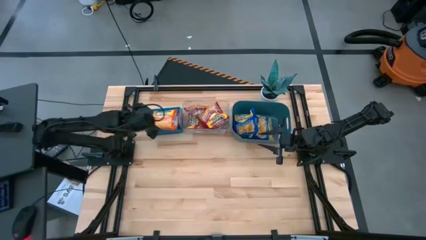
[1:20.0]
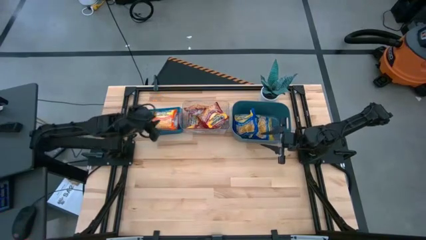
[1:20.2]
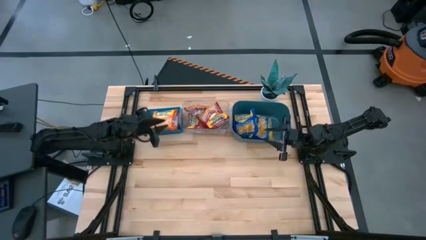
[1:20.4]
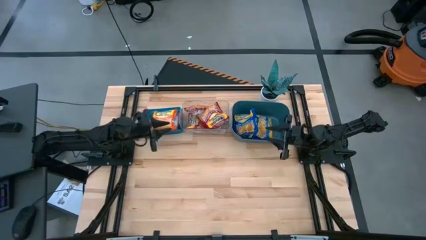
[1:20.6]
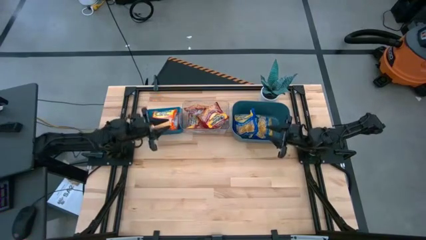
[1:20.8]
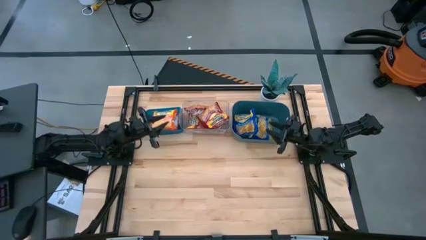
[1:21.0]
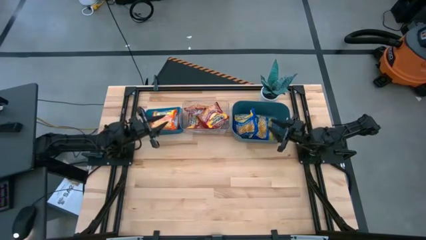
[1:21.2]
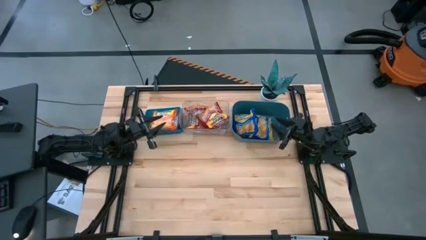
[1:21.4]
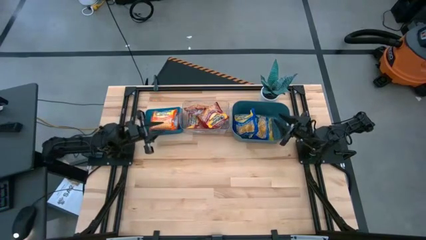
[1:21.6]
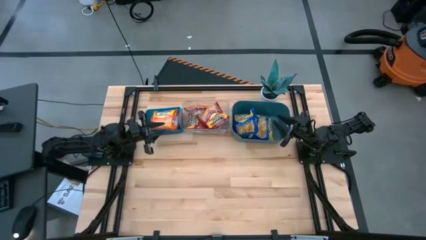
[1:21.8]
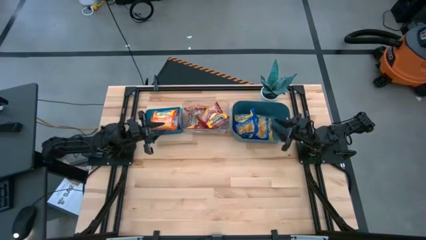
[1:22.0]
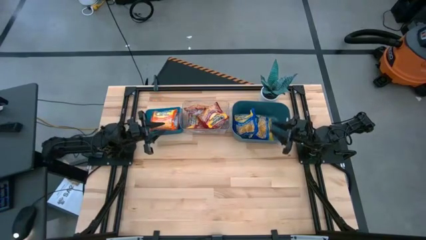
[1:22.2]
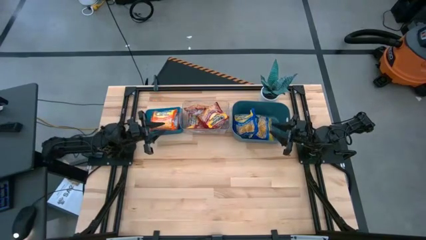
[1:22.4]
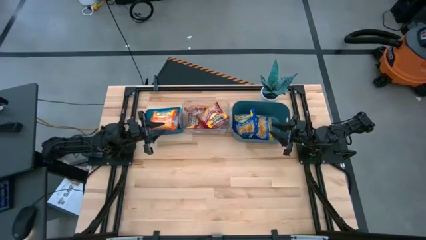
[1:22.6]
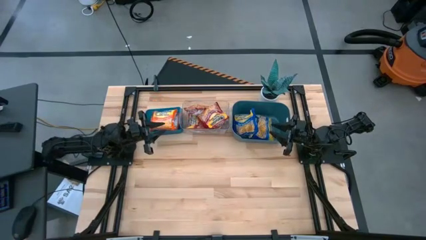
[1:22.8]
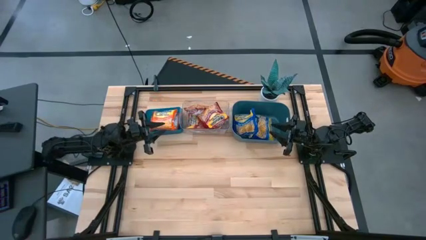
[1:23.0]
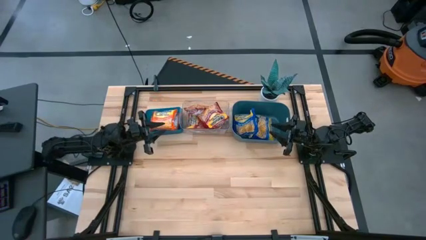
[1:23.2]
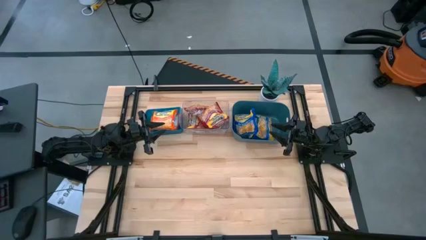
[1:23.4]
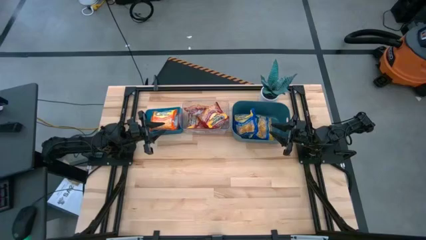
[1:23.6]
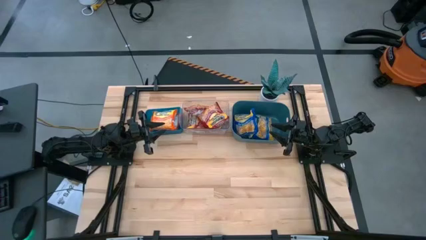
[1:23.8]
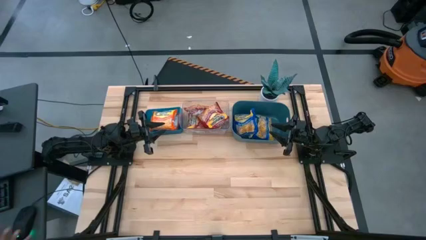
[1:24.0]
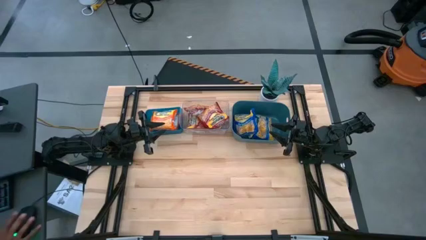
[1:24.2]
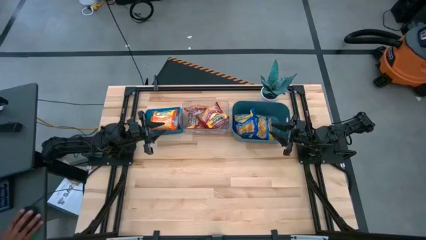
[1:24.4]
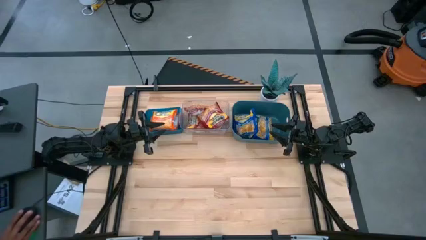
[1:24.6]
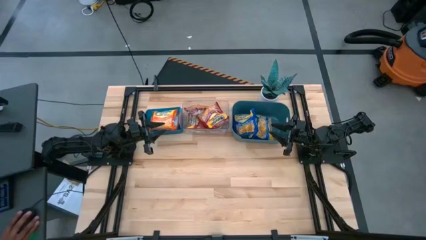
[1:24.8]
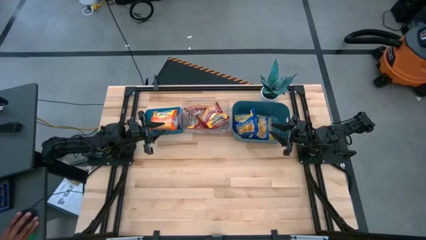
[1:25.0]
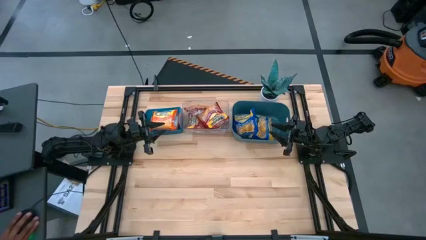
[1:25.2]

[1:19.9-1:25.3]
Task: Sort Maruchan noodles
Return to Home Position

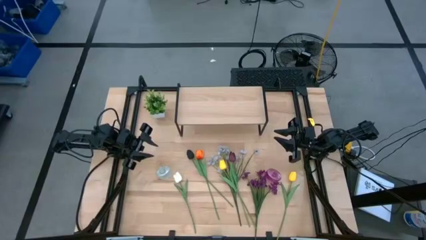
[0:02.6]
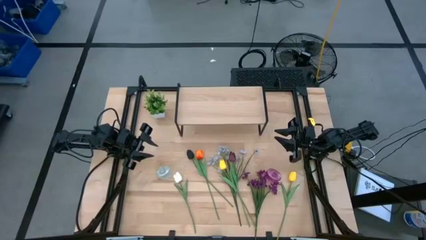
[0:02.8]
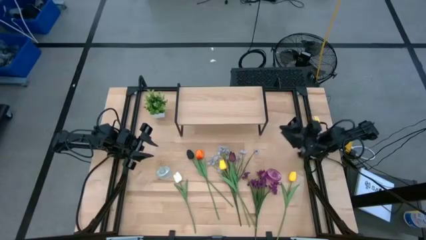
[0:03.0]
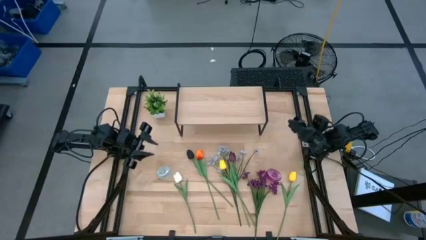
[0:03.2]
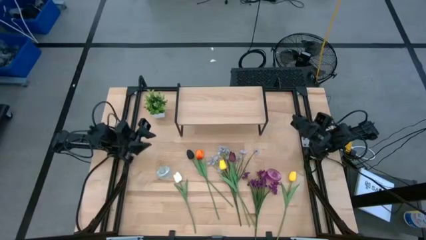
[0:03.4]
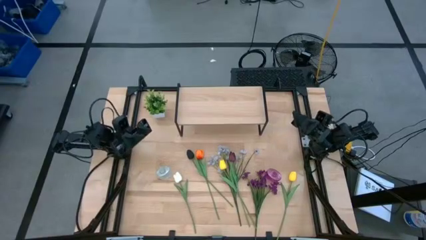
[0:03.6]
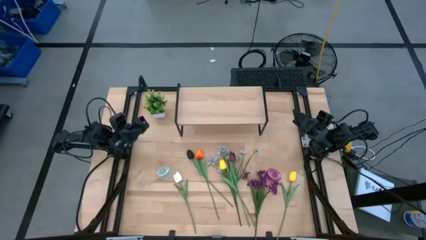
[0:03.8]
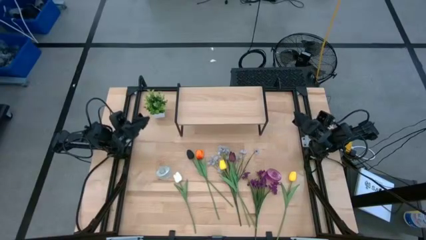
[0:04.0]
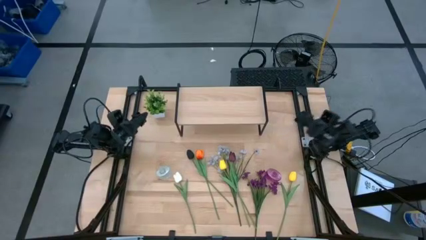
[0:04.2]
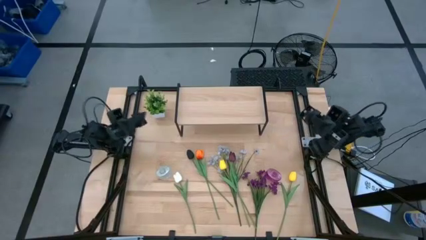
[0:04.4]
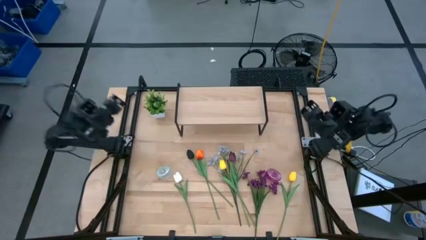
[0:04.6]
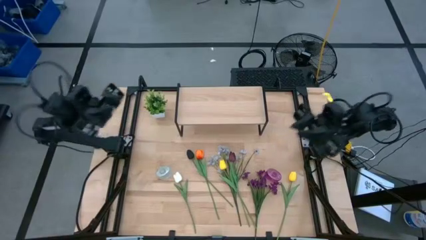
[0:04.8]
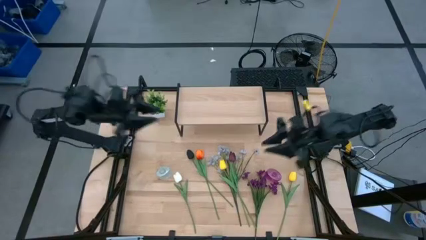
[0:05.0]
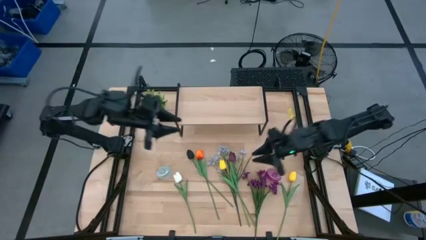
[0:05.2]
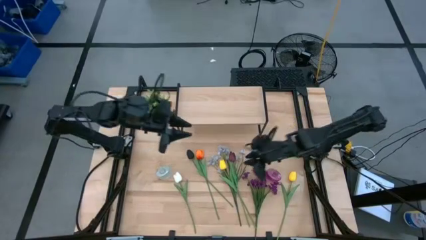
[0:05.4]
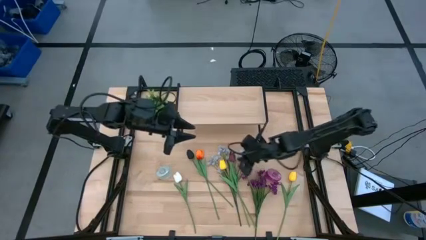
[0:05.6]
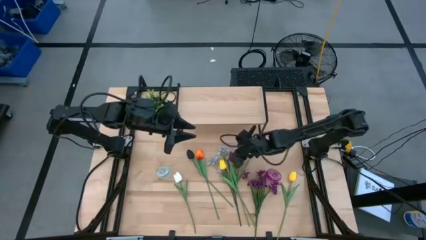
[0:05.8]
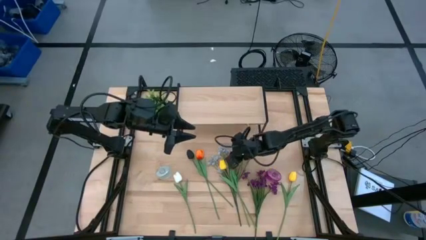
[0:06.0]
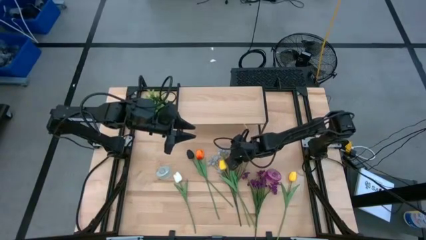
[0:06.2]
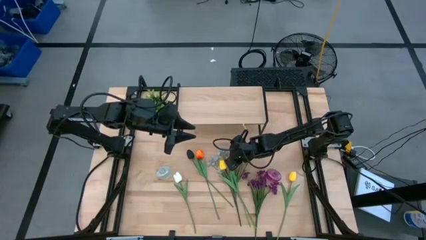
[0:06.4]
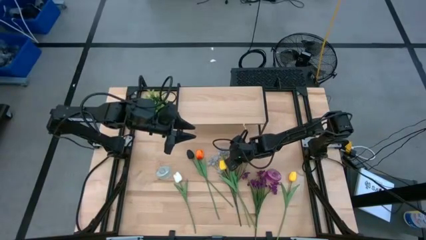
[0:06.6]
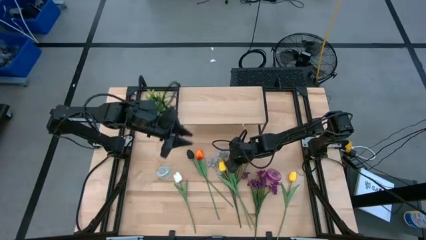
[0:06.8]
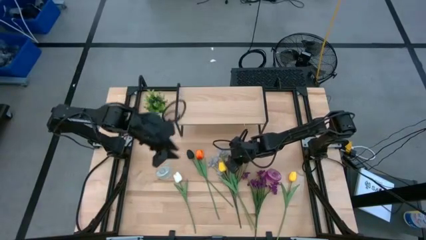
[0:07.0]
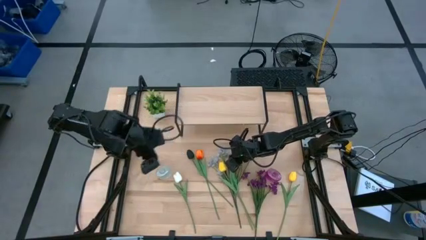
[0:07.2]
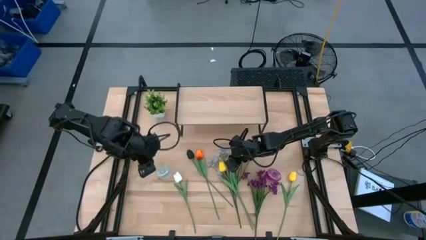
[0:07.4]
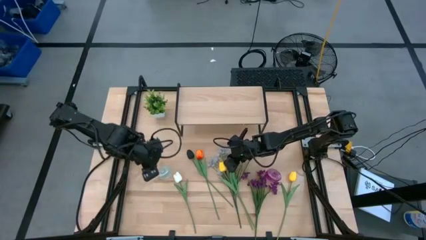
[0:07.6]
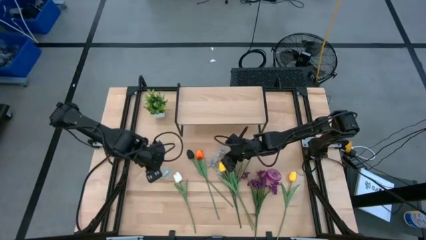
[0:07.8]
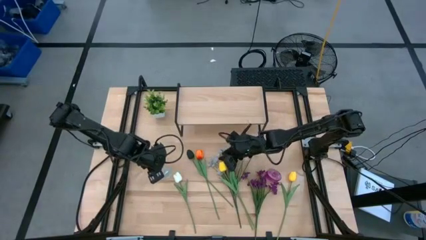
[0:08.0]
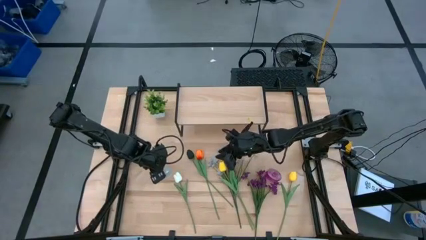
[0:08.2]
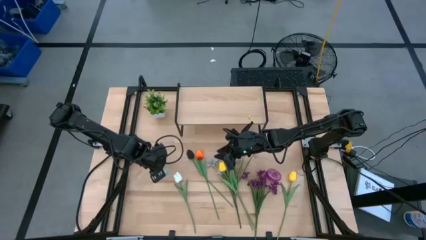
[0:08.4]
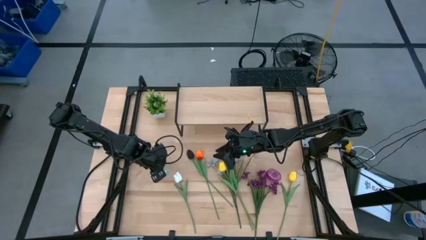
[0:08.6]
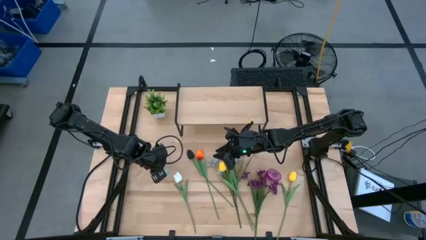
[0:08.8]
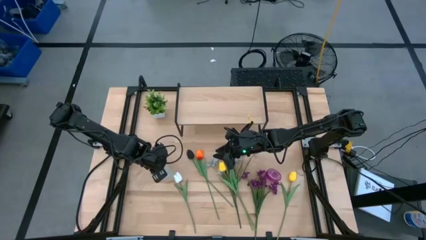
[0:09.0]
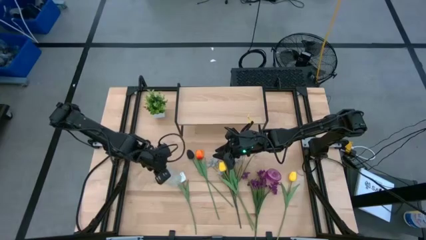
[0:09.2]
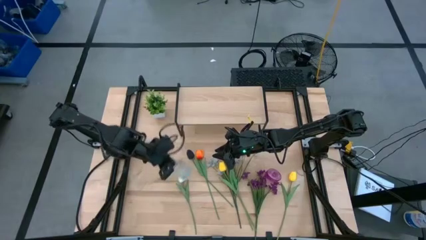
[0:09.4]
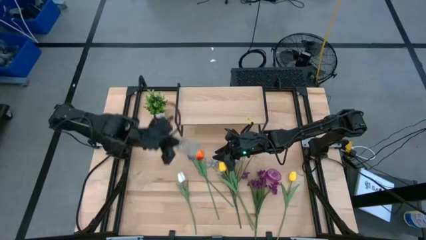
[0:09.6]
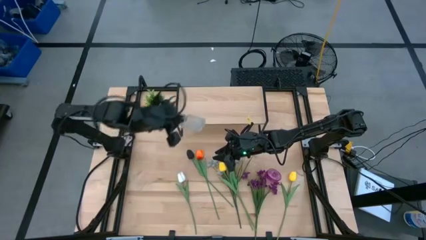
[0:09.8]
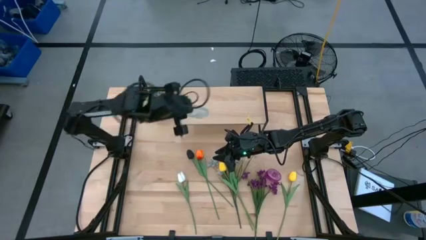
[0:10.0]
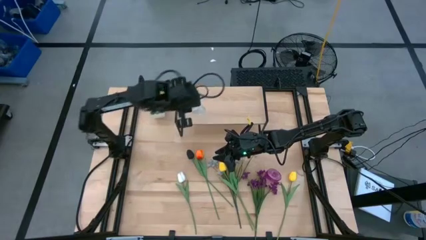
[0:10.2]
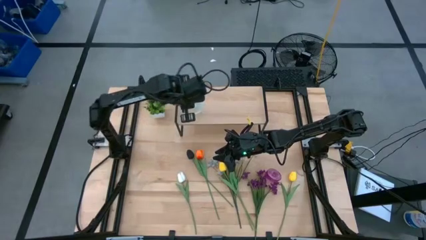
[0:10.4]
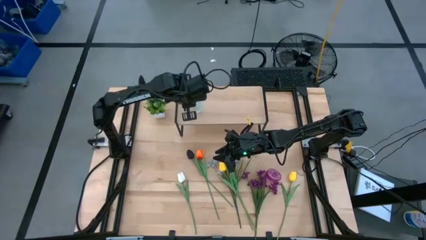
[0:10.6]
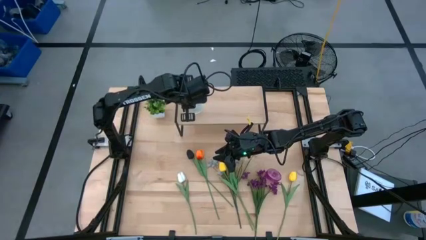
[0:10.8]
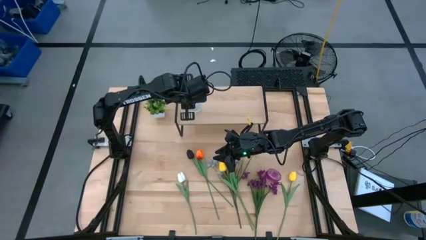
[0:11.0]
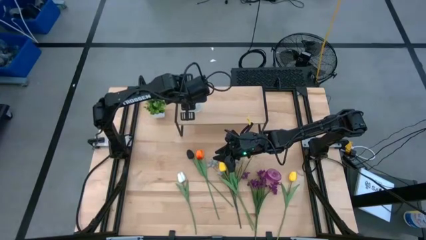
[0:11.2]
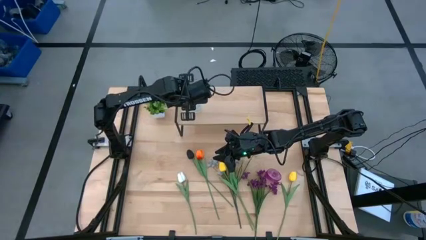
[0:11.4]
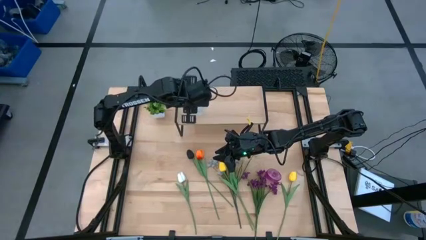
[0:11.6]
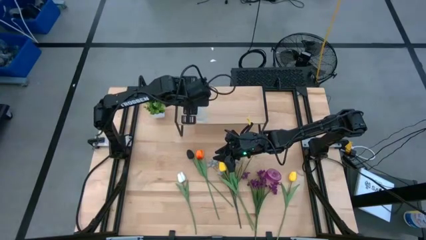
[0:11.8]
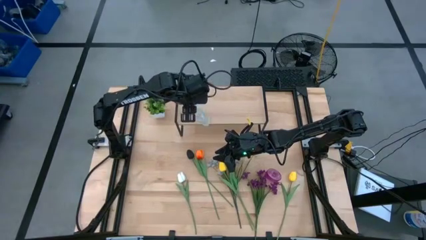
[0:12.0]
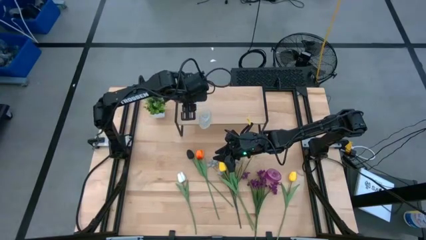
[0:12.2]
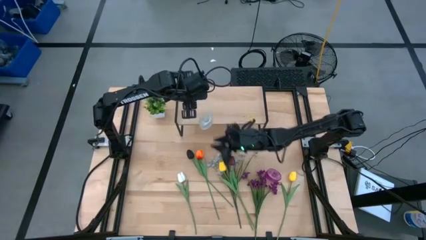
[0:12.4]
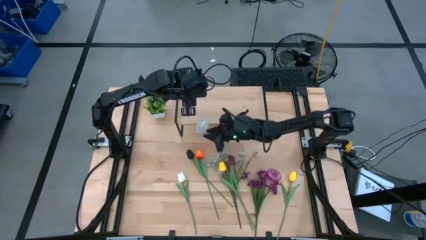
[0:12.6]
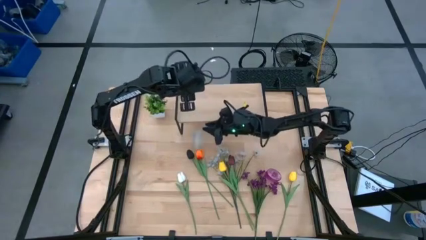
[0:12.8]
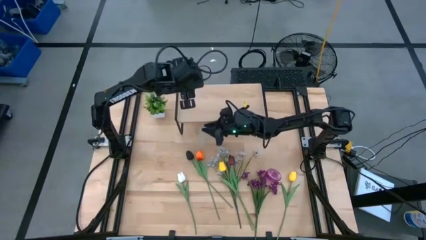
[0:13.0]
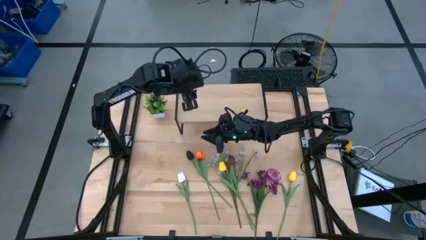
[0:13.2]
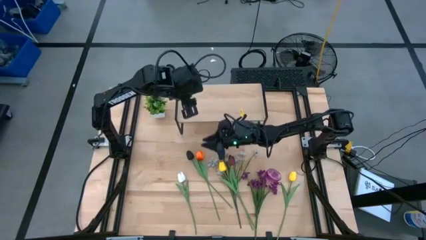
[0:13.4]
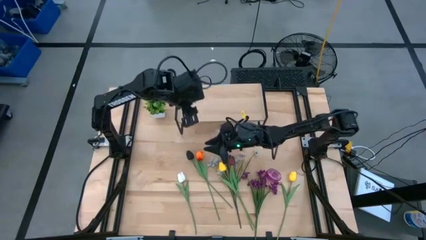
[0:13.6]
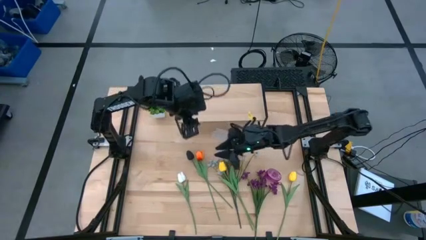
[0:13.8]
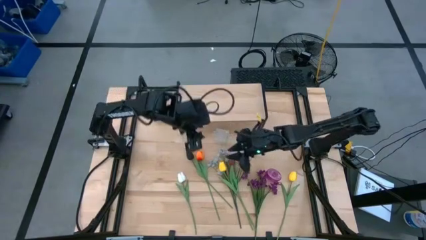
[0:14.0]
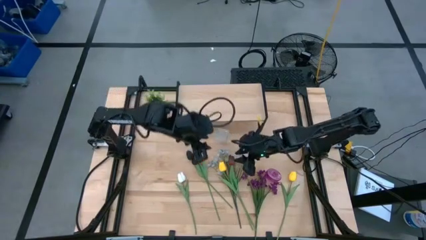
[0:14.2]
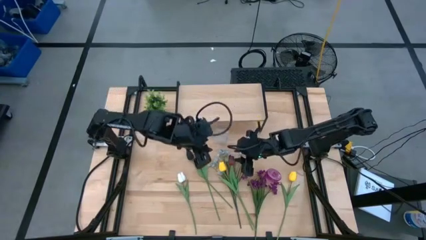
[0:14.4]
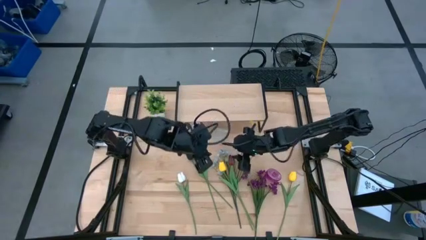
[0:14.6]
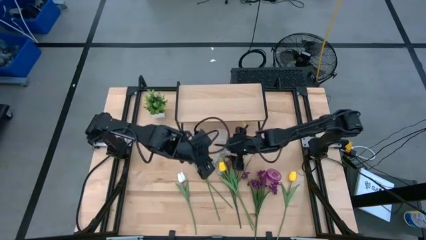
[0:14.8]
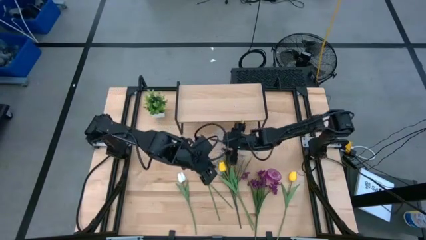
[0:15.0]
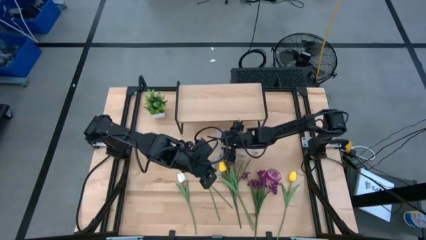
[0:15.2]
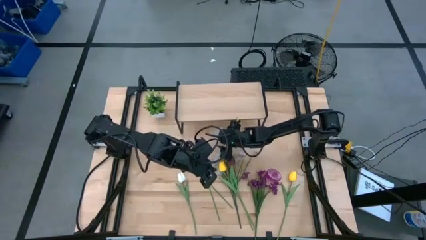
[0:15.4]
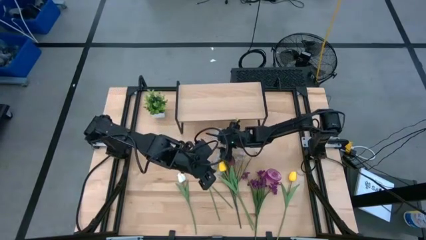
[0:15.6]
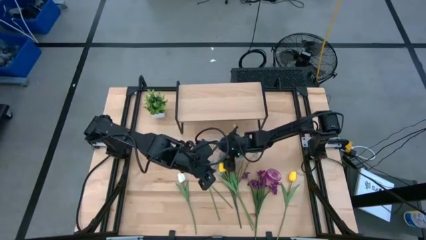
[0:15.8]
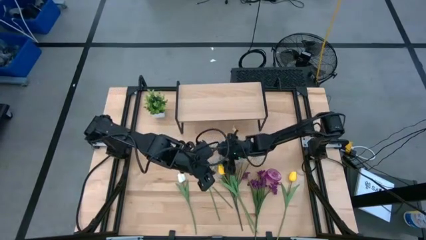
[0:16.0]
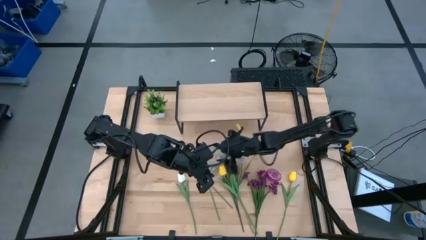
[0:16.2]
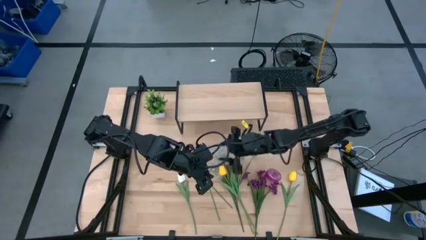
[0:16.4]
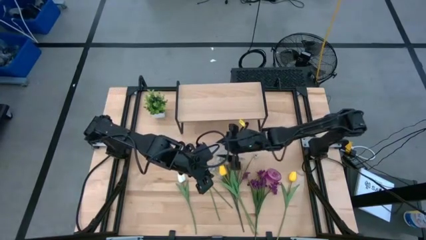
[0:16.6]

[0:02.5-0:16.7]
Task: Pick and place flowers into a vace then onto a shelf
Put the white vase on the shelf
